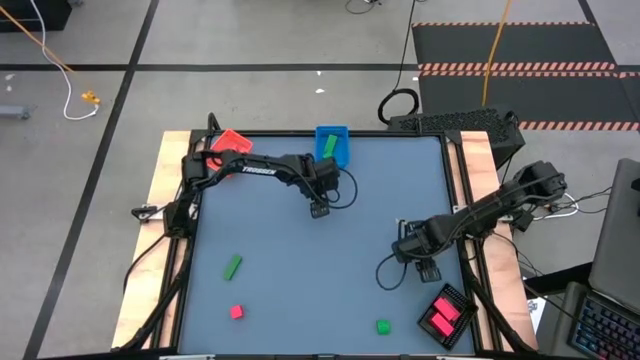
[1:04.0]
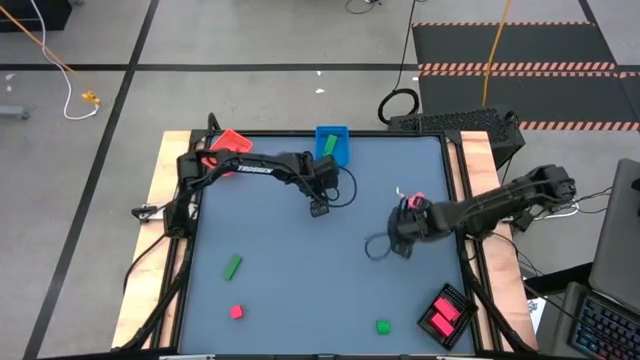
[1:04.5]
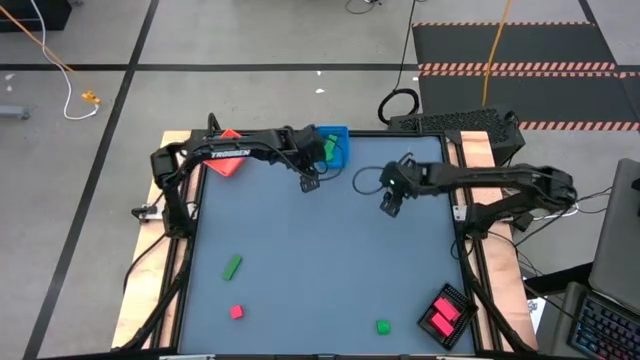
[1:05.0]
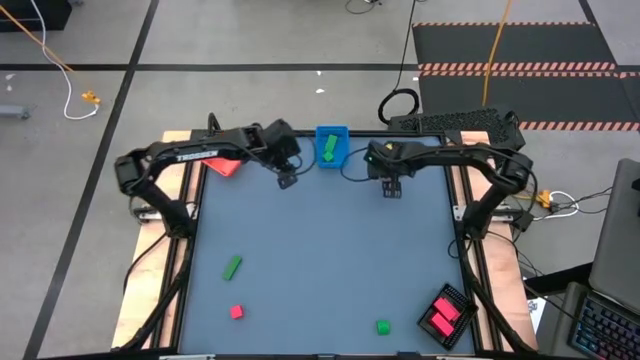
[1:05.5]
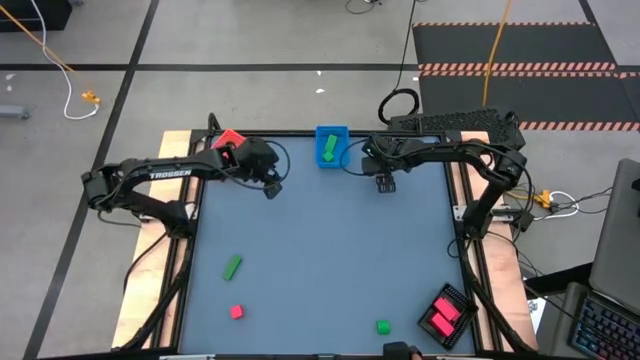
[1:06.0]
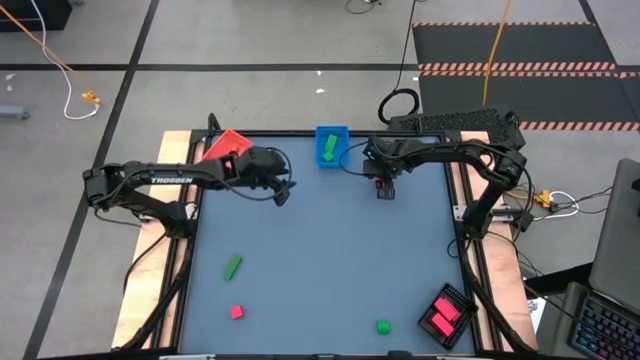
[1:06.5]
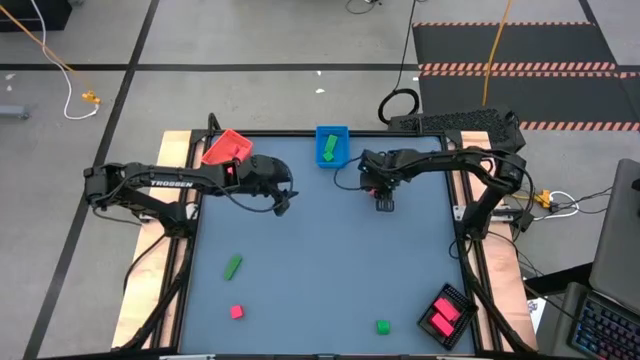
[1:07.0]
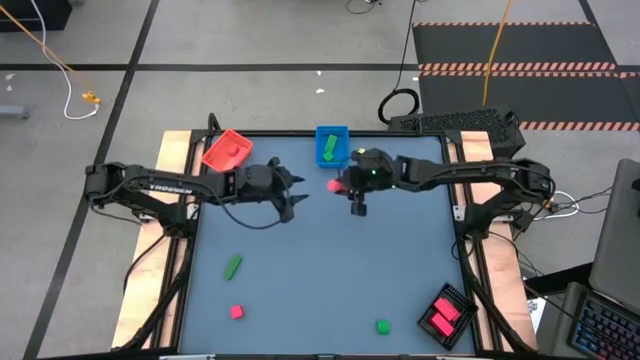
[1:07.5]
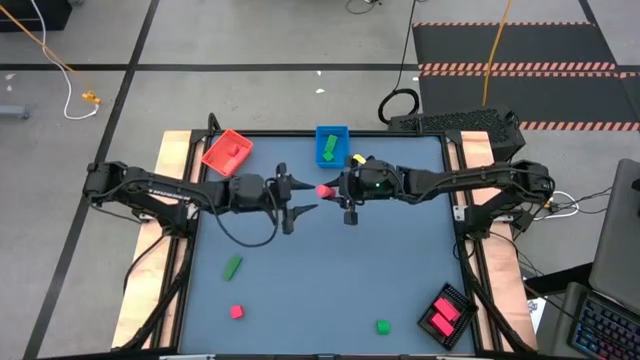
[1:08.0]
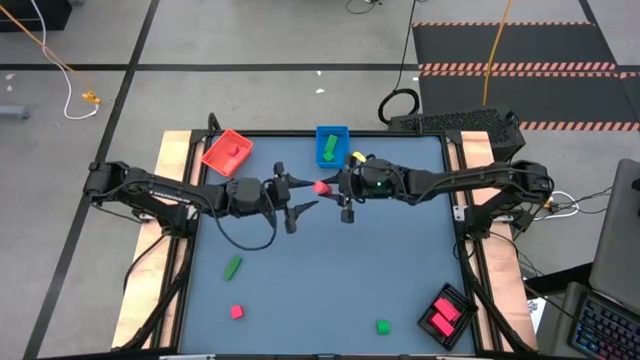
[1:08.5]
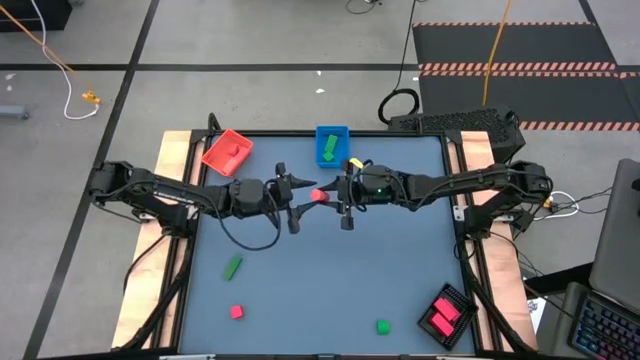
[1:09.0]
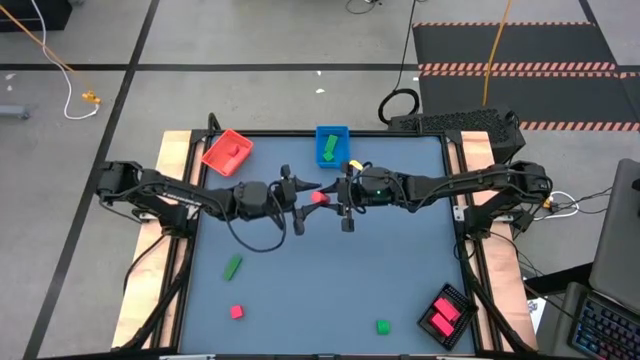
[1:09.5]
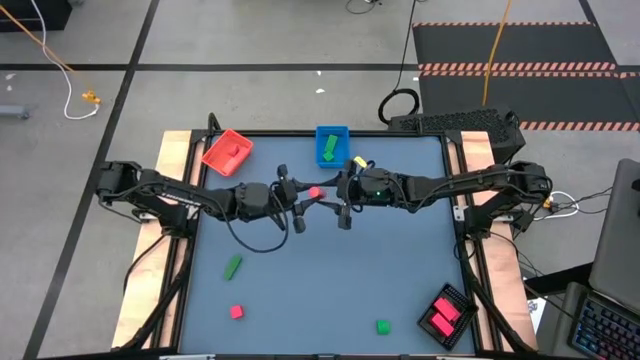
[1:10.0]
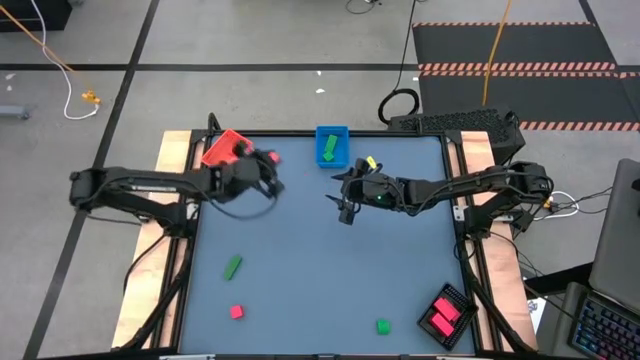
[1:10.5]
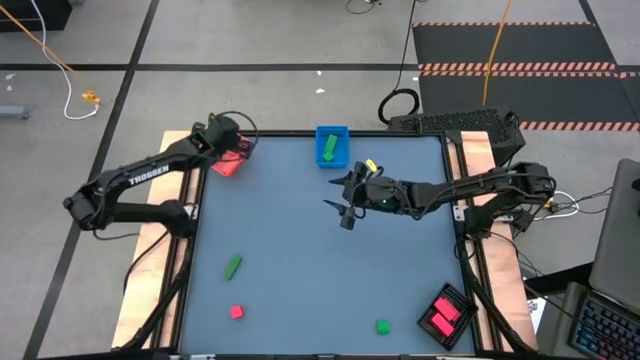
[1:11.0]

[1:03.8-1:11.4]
Task: Sort & place blocks by color
Put the orange block into the orange bin

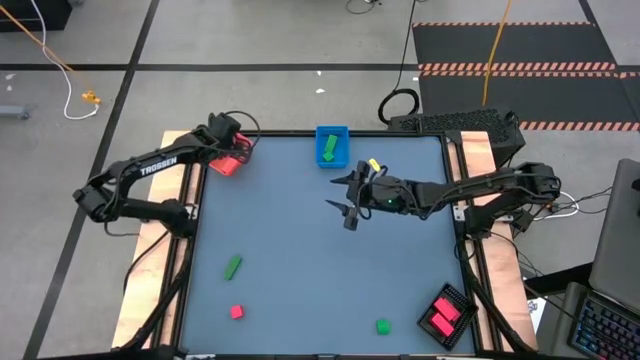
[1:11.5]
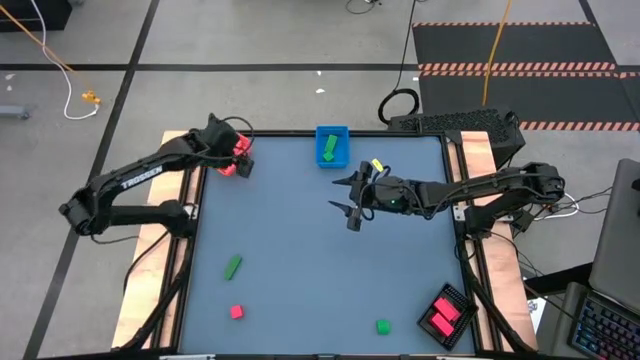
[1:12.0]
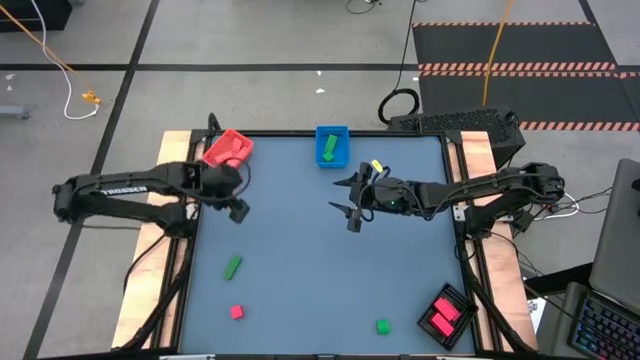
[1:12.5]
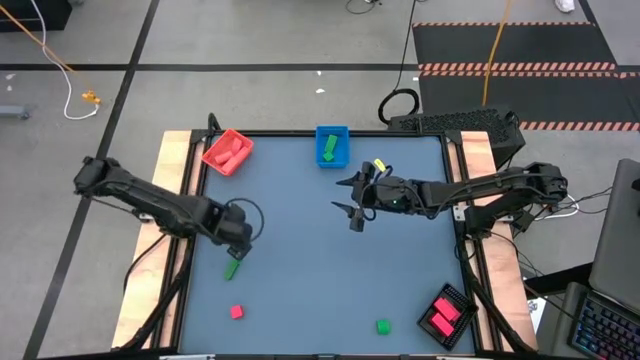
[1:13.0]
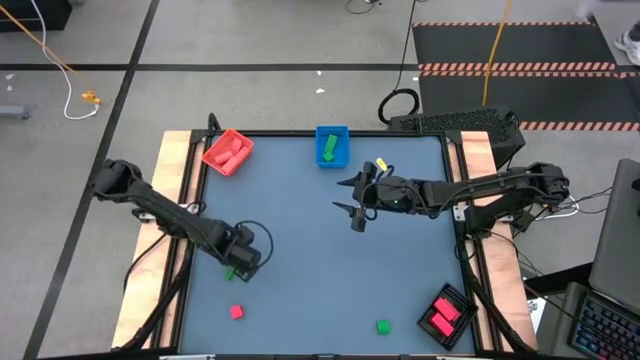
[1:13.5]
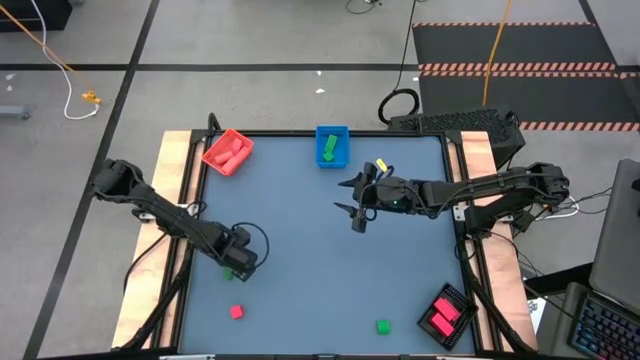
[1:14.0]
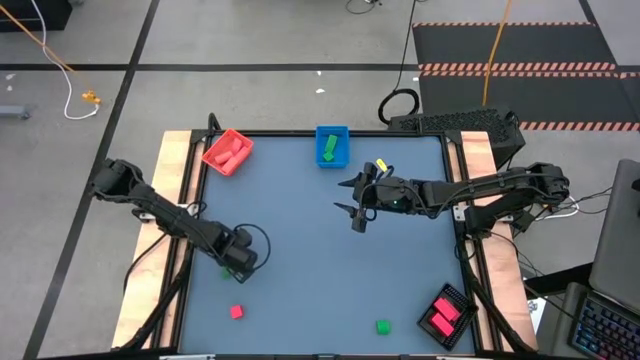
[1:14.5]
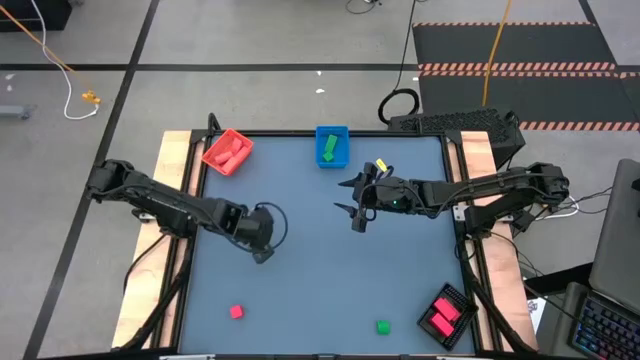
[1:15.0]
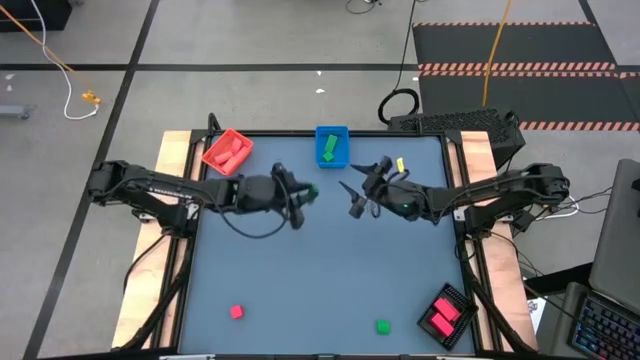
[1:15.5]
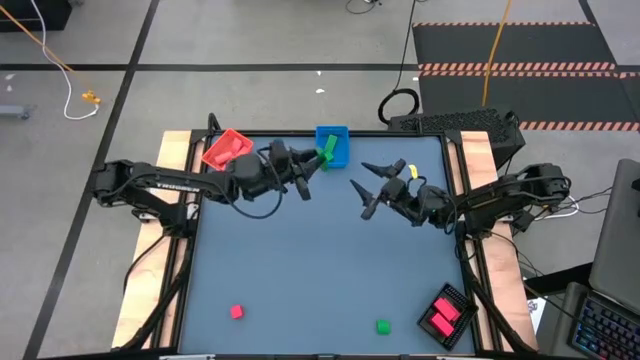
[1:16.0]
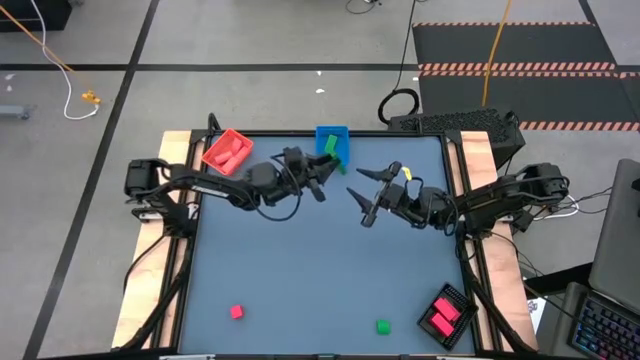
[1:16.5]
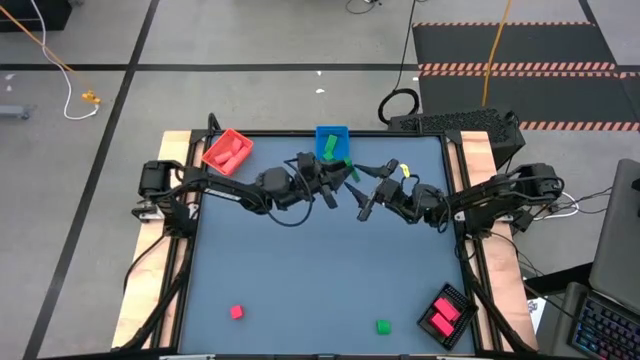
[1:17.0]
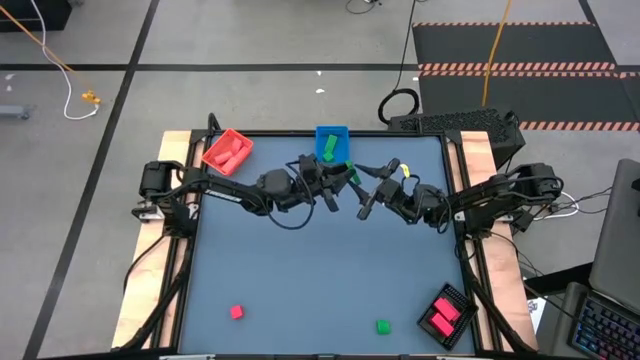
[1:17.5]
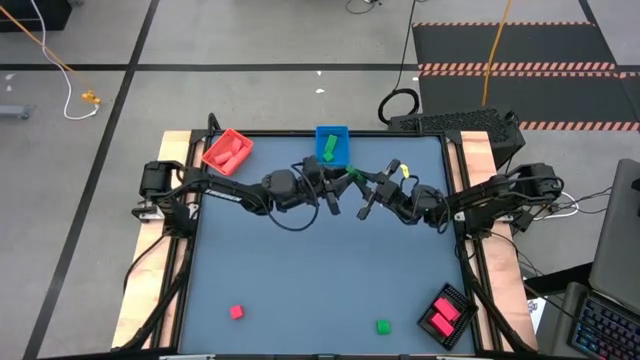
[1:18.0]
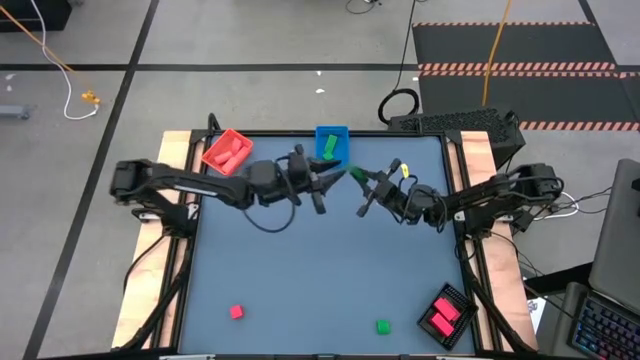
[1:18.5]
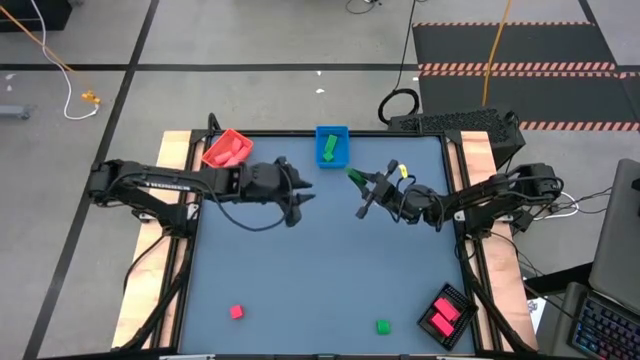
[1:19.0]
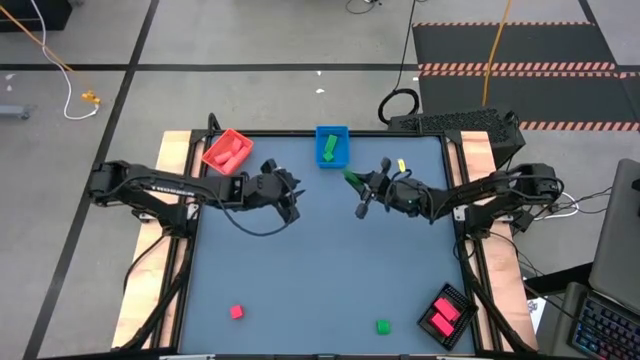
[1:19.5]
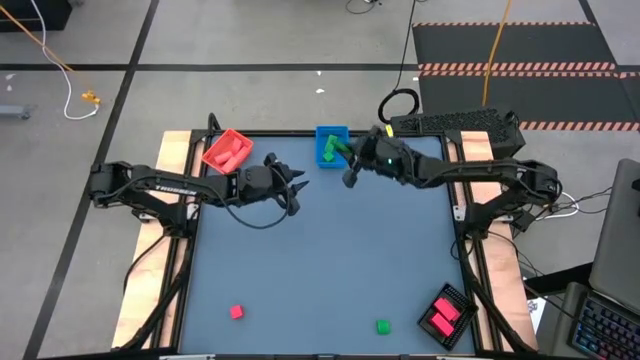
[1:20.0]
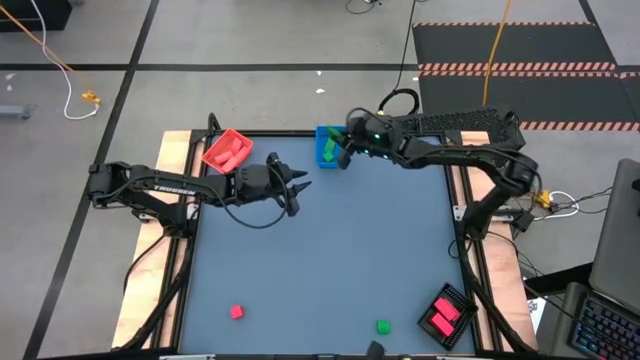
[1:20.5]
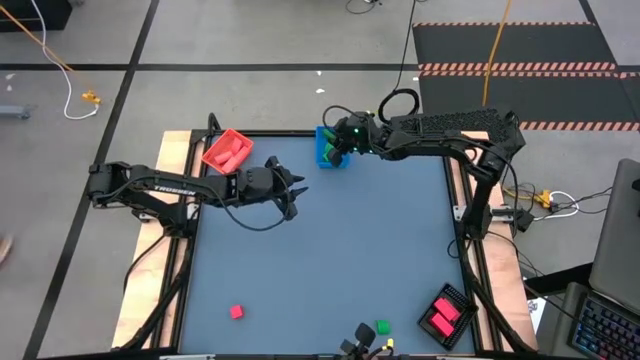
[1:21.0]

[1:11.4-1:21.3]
Put the green block into the blue bin

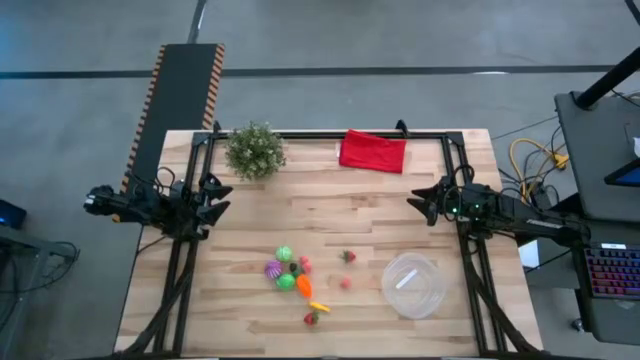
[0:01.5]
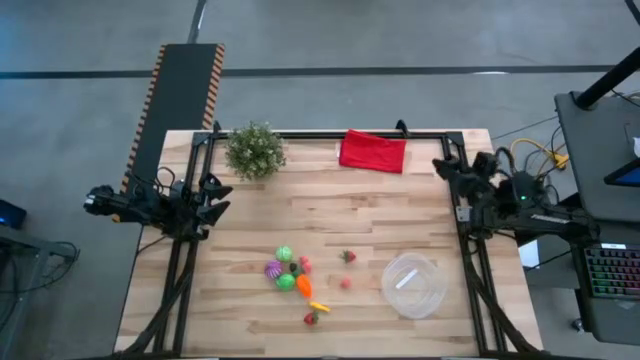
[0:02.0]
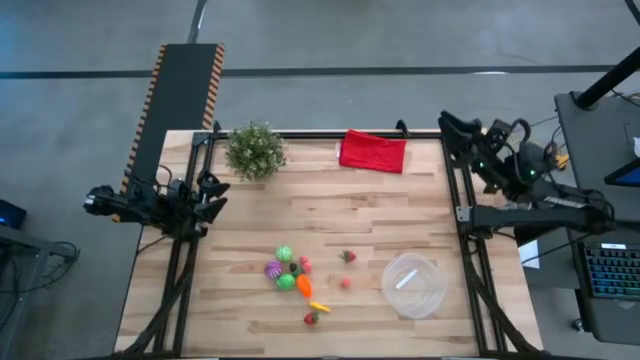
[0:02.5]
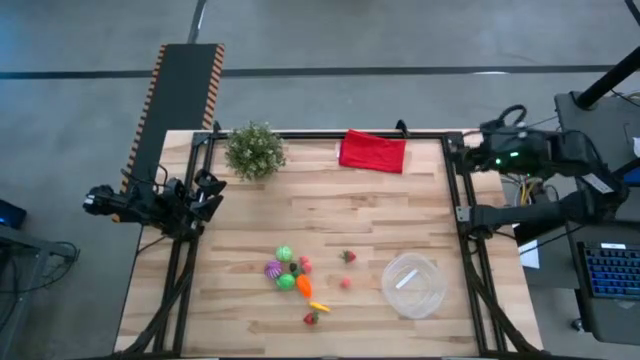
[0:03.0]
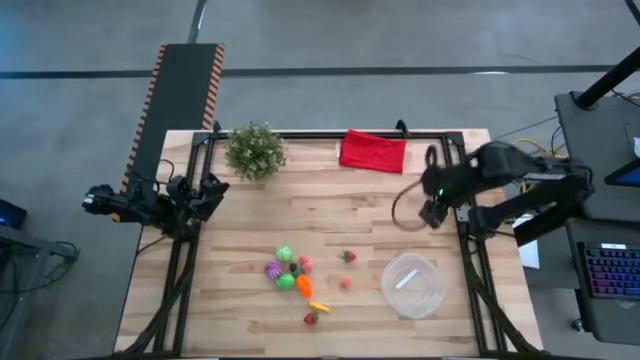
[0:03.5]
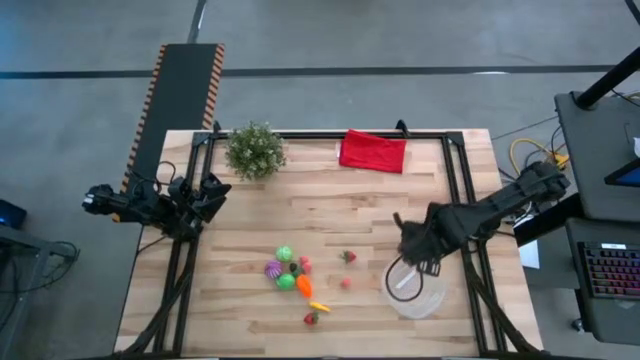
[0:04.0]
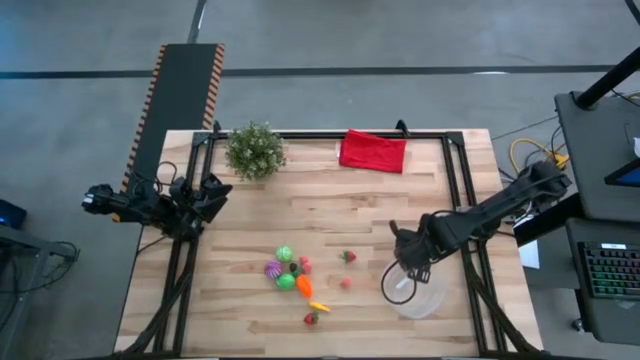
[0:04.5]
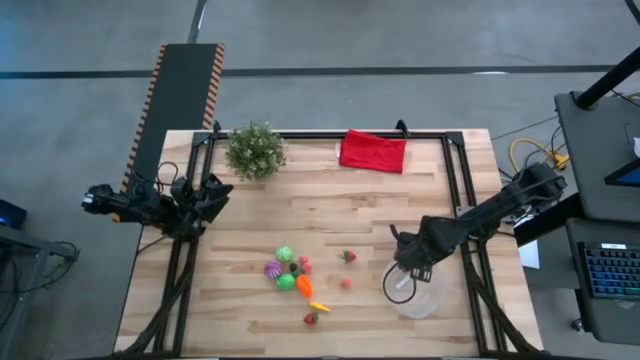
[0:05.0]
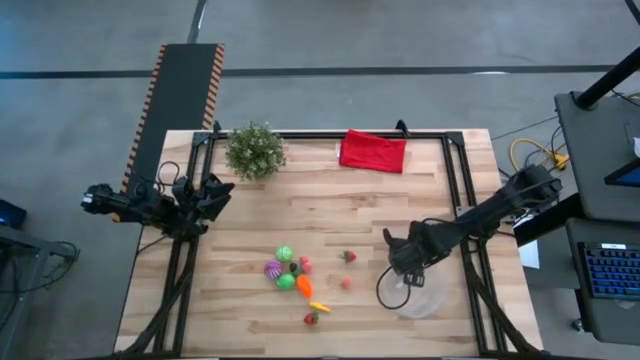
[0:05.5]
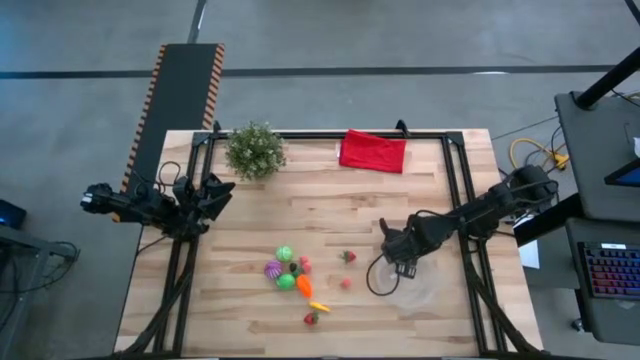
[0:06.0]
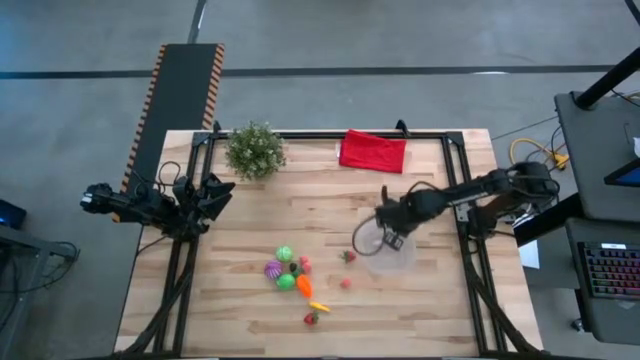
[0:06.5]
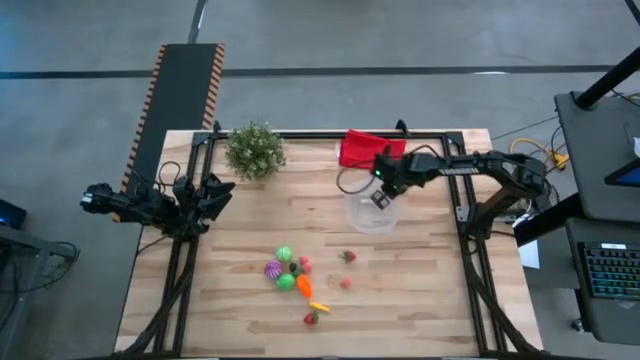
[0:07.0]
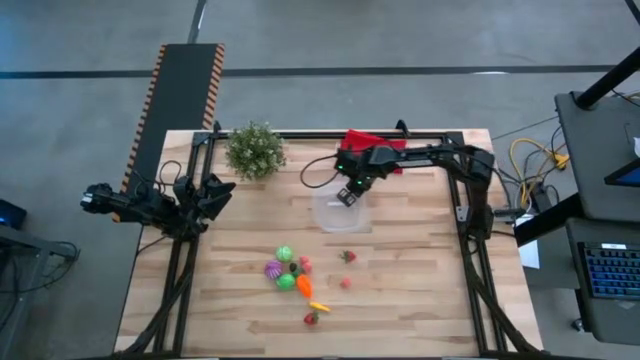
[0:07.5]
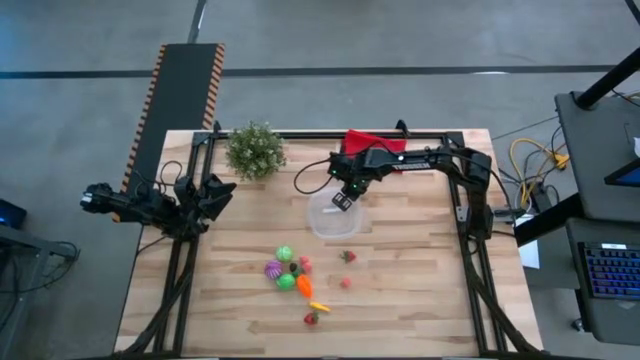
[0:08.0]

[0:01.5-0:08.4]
Task: Pick and placing Produce into tupperware
Prepare the transparent container
